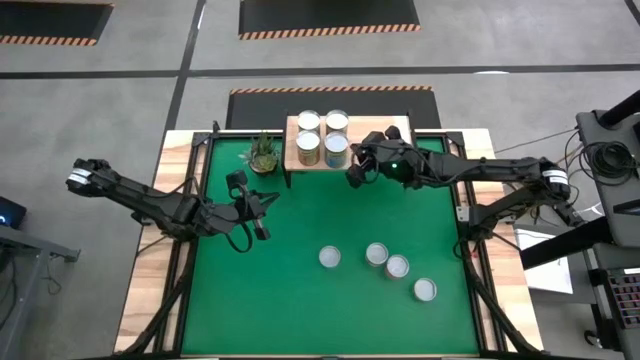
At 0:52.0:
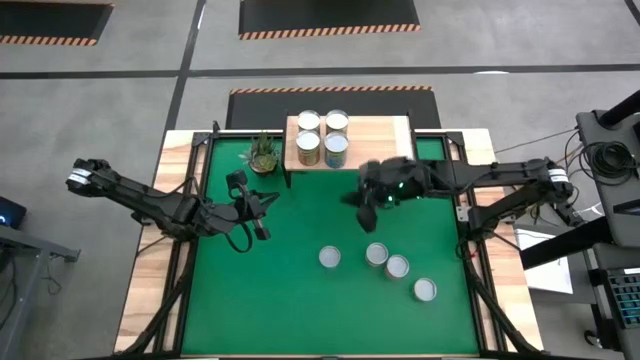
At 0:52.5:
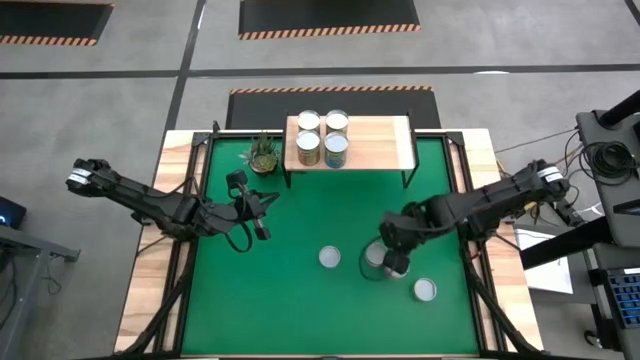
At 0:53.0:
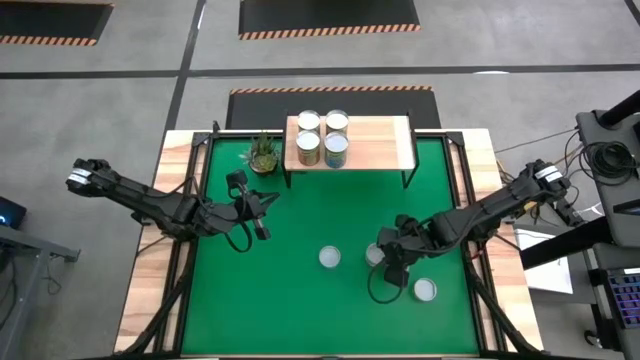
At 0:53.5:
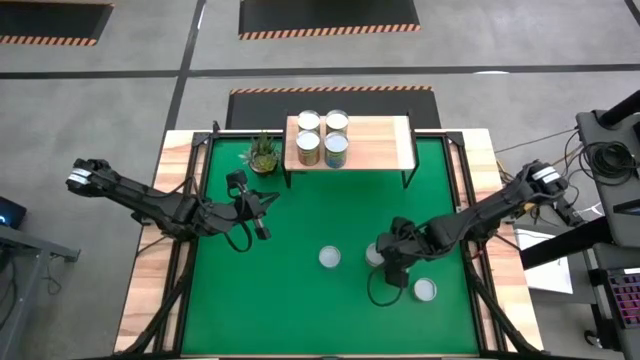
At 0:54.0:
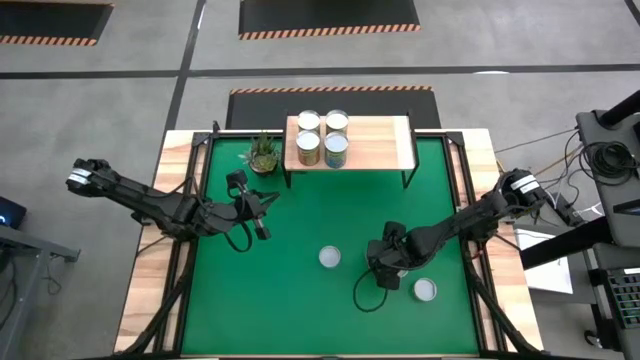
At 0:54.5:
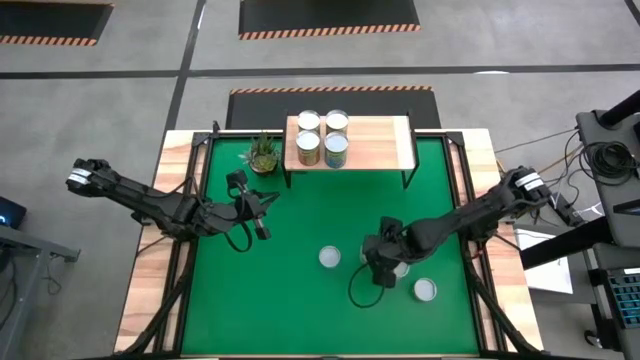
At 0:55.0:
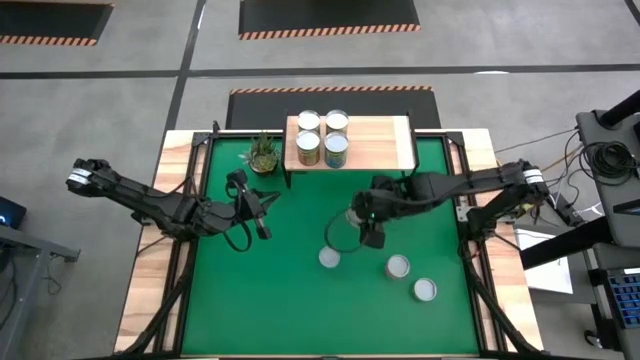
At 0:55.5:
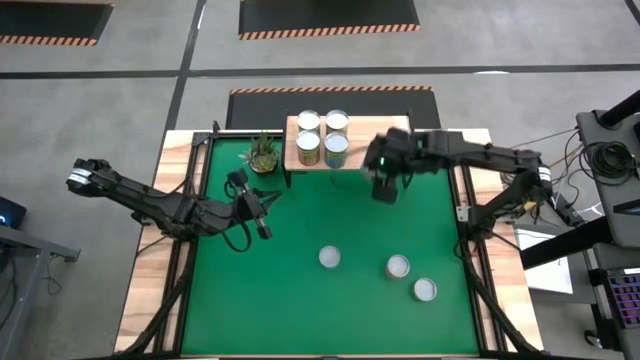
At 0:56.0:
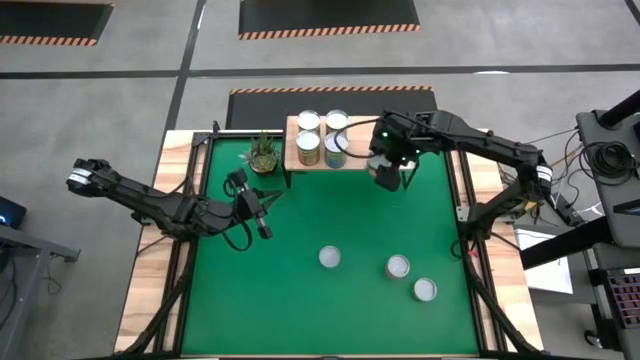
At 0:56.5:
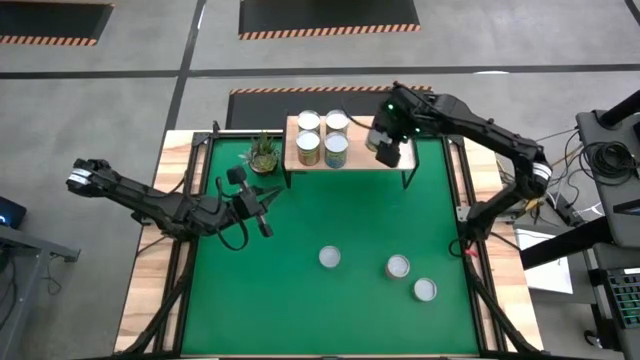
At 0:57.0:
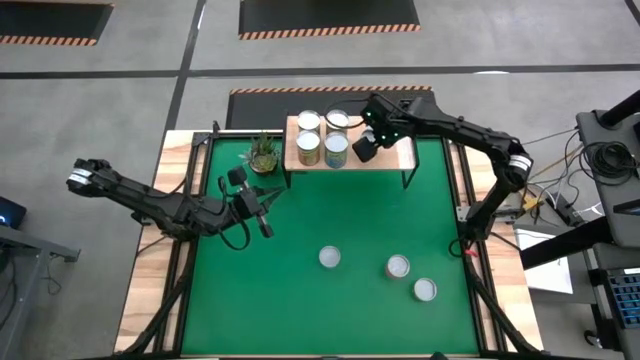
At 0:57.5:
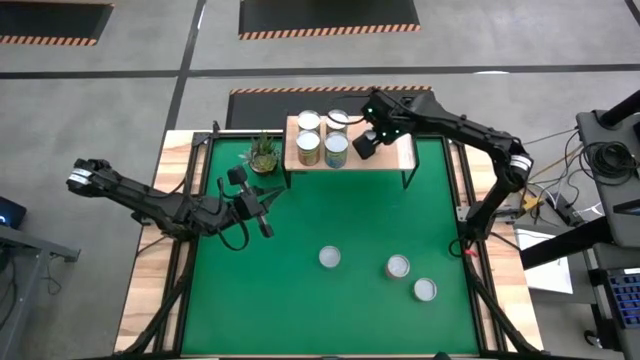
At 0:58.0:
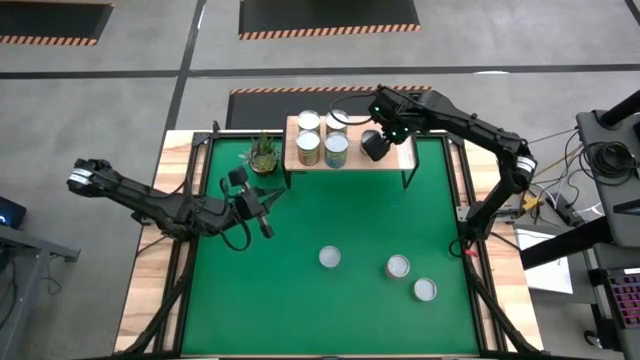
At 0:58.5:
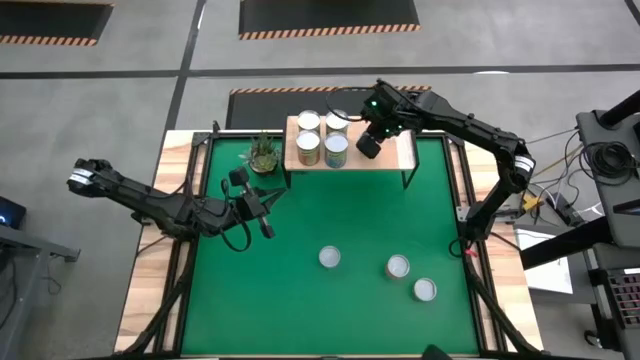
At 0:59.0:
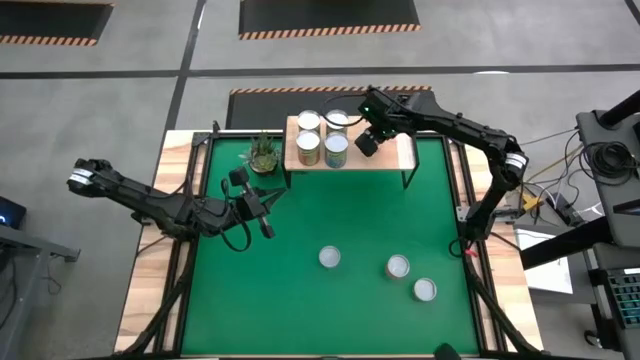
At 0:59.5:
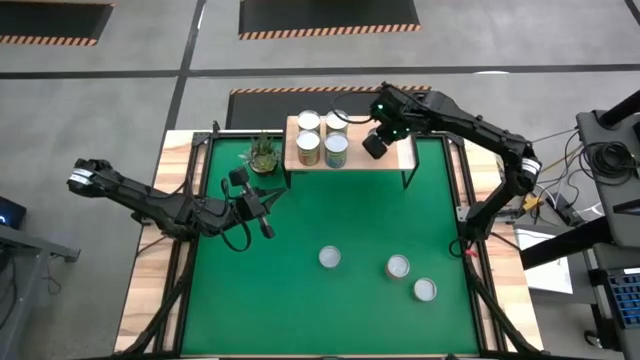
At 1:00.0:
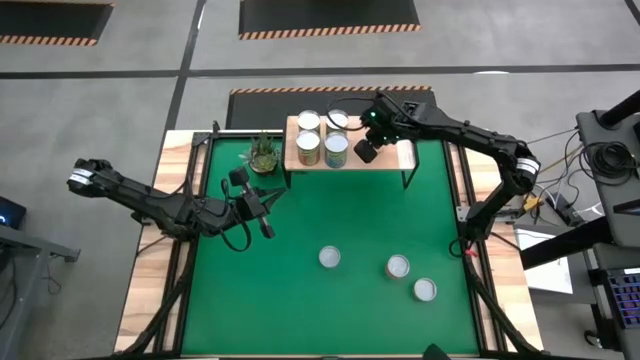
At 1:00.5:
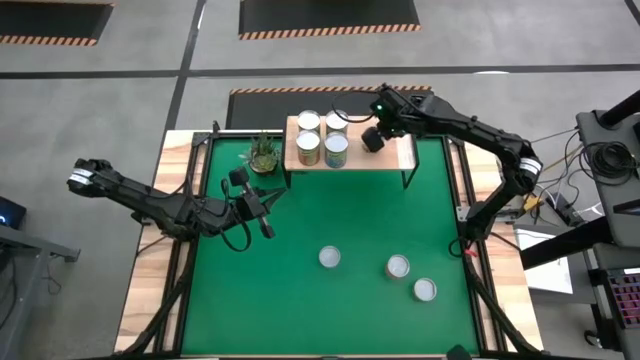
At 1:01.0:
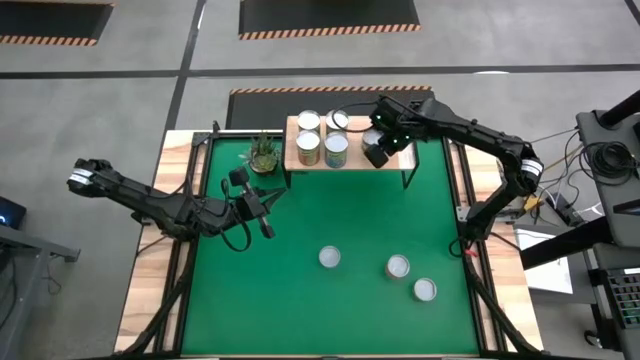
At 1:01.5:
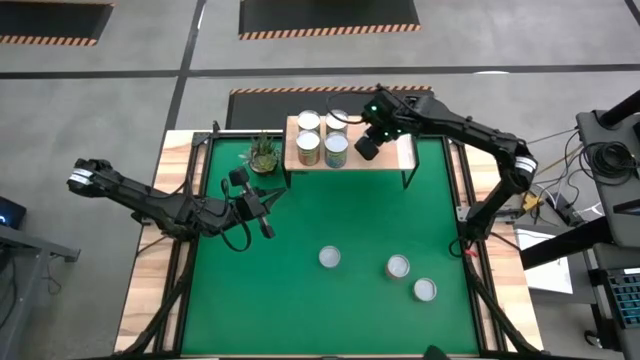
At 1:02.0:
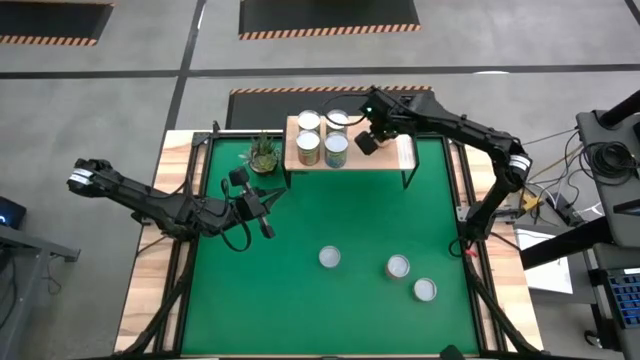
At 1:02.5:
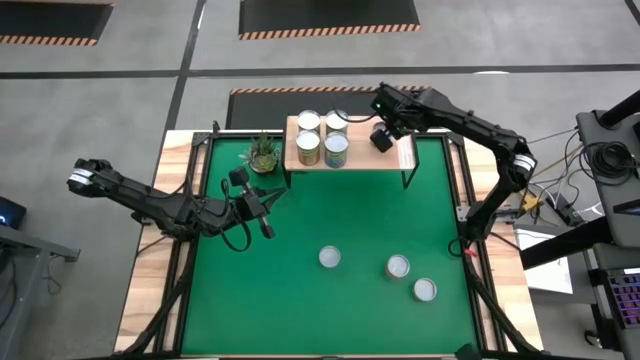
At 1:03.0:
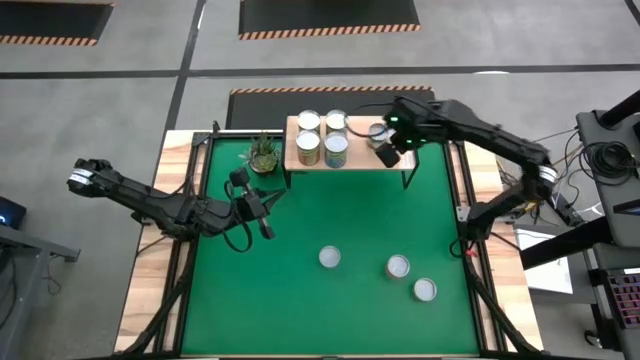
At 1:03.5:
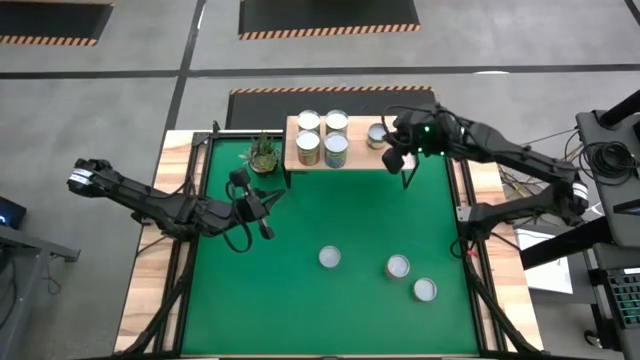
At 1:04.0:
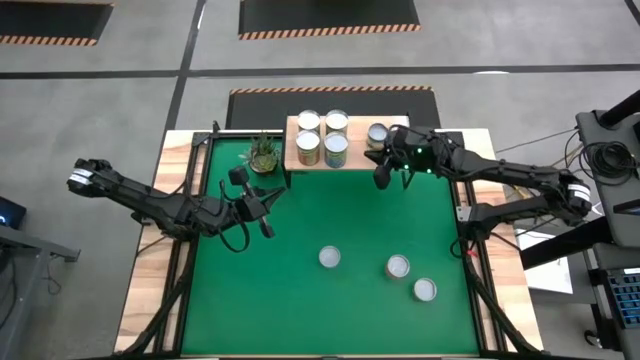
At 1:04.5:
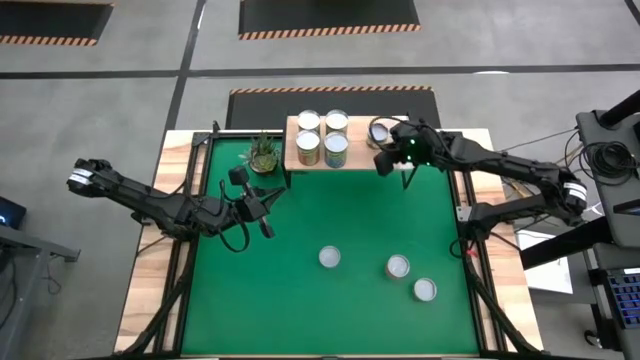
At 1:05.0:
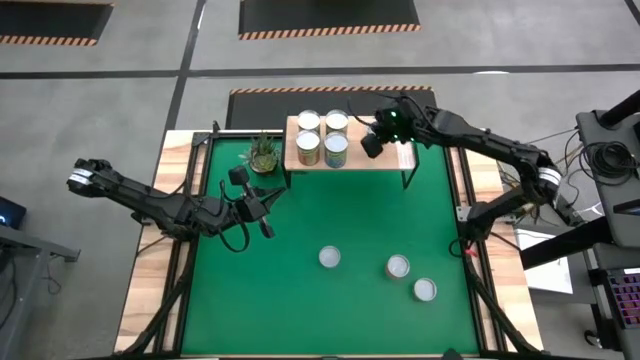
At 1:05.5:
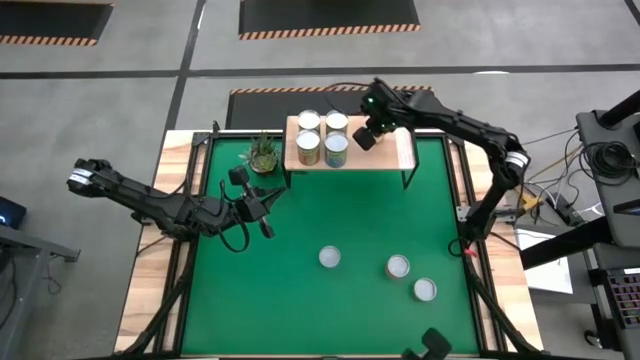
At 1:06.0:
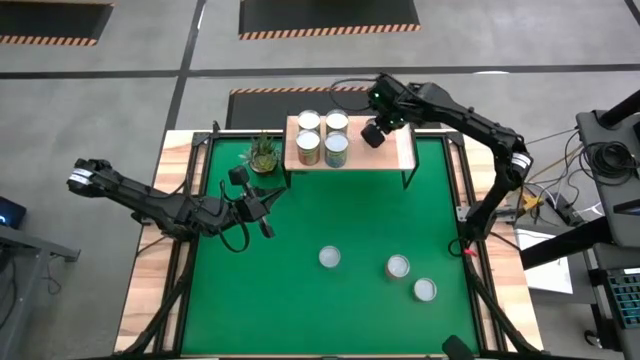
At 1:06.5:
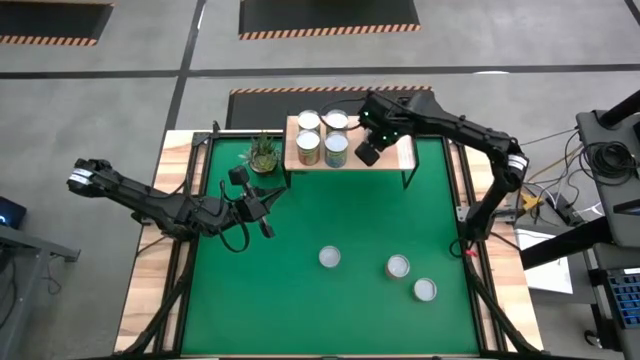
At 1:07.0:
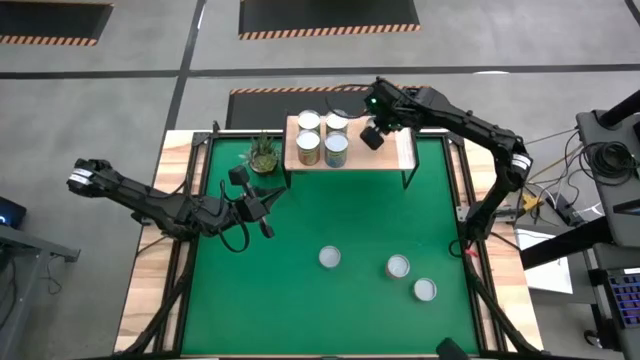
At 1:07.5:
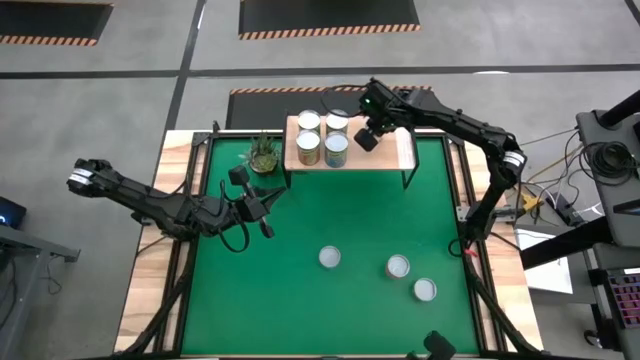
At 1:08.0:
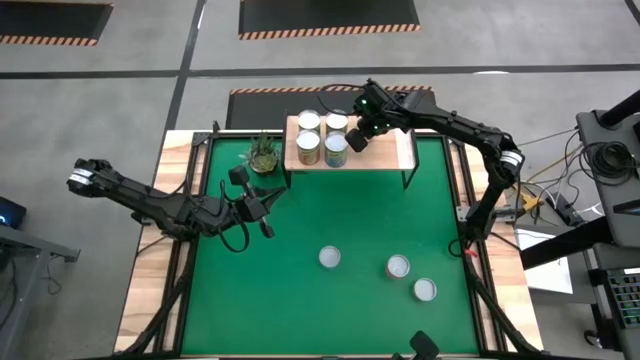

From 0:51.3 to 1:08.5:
Task: Pick and place cans onto a shelf
Put the canned peaches on the shelf

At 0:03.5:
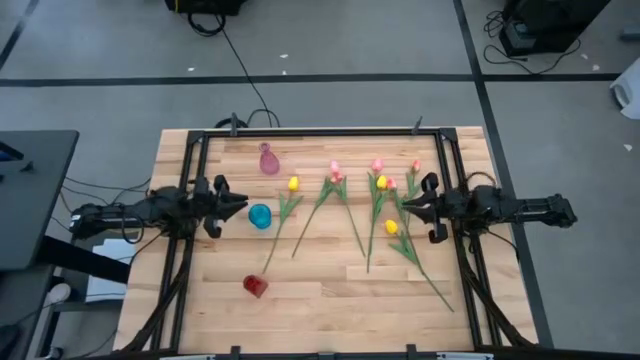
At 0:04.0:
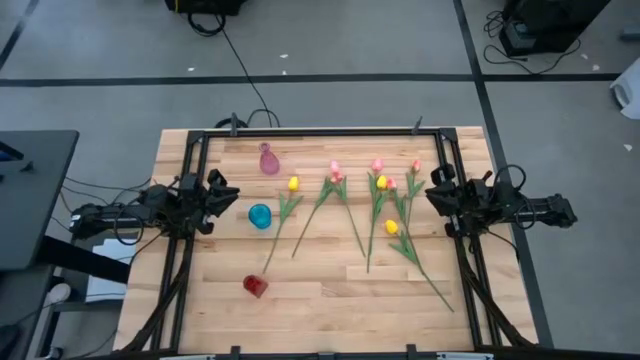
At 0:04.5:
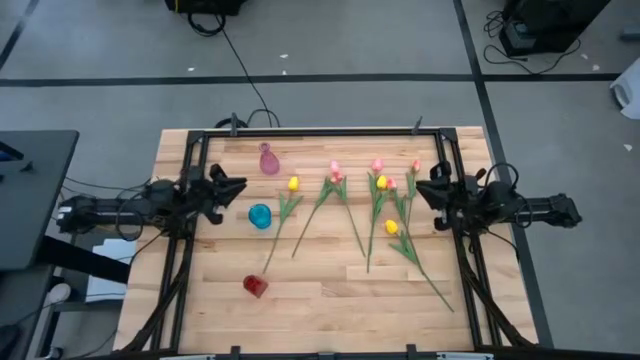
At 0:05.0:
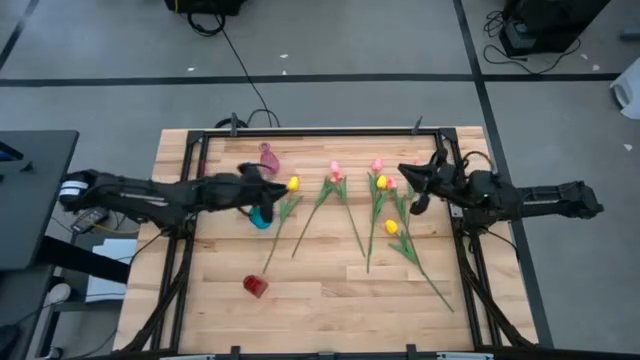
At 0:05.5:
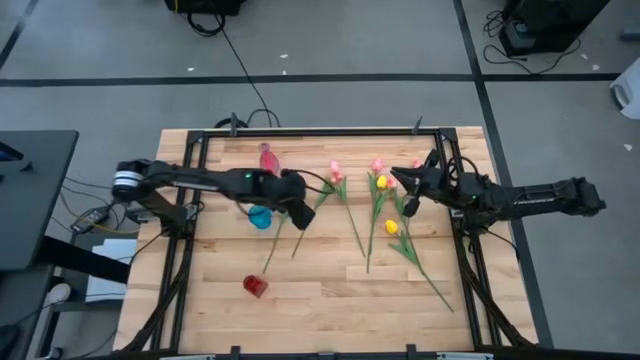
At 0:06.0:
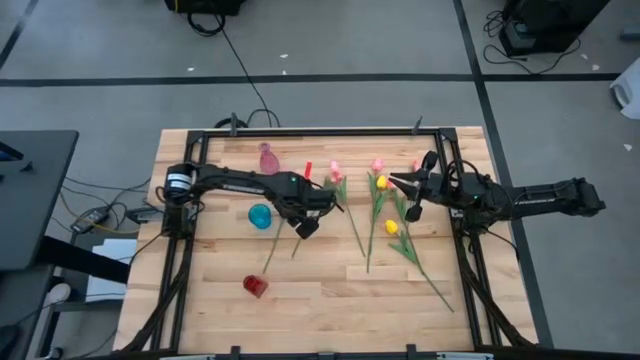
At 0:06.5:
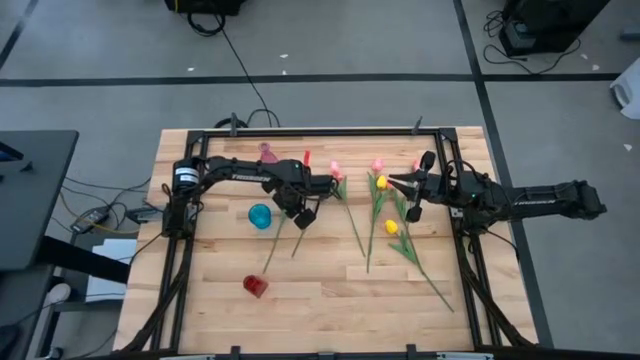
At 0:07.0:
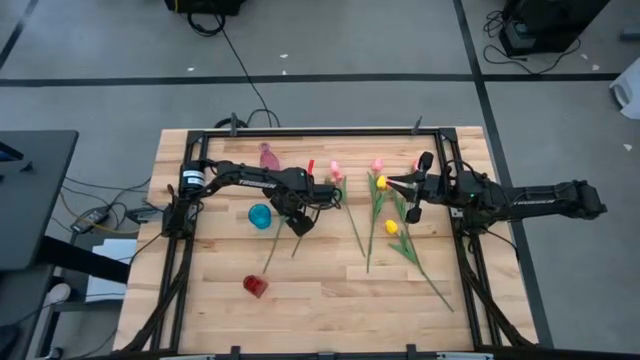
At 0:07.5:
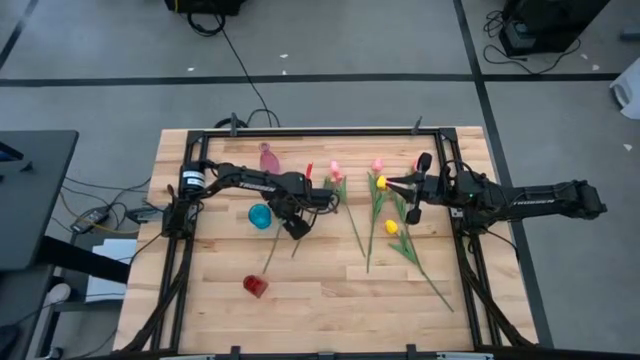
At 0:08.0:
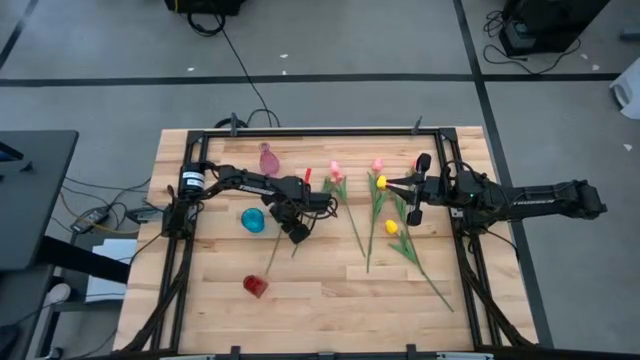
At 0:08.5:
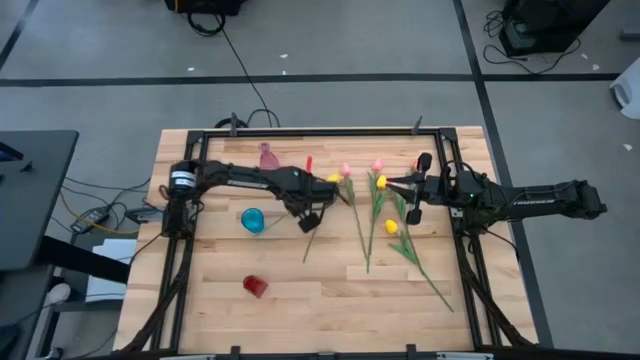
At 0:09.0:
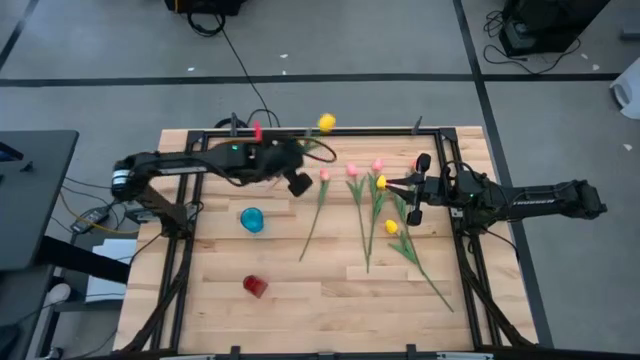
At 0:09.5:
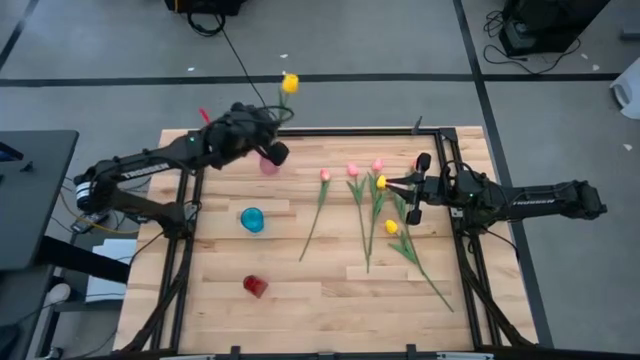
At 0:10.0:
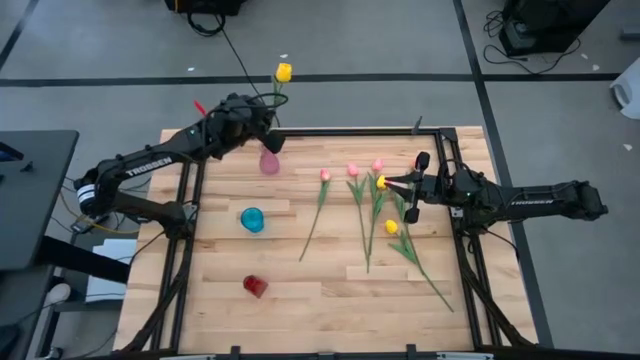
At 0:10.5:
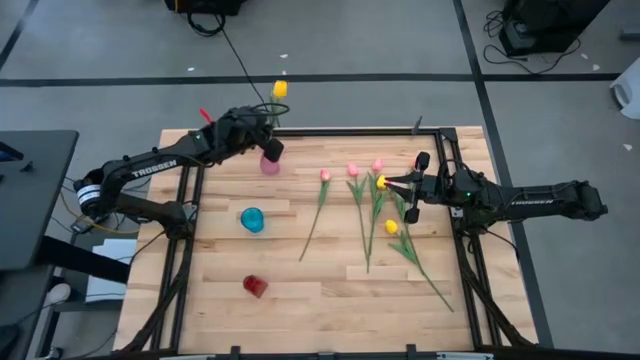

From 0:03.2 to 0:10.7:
Task: Sort flowers into vase by color
Put the yellow flower into the purple flower vase
